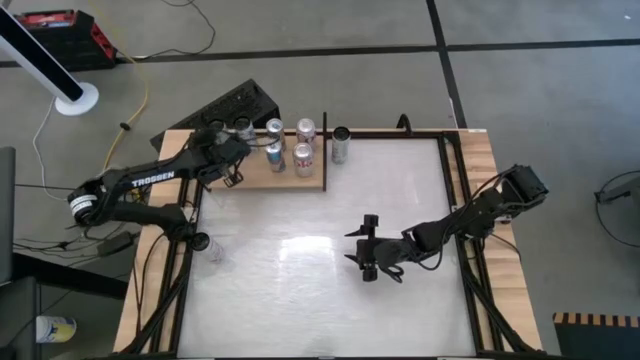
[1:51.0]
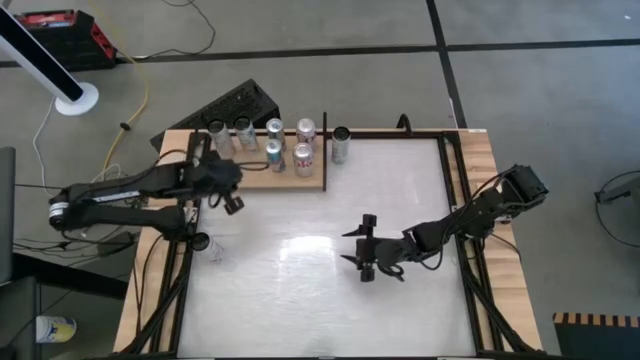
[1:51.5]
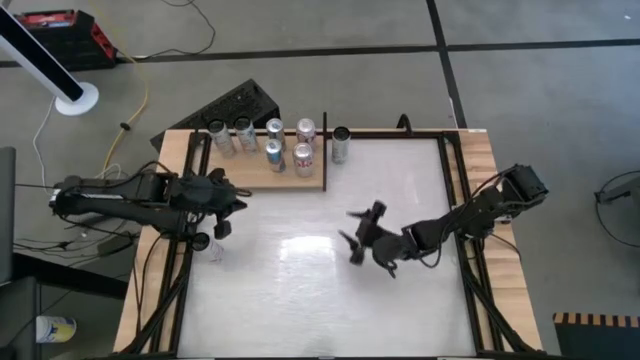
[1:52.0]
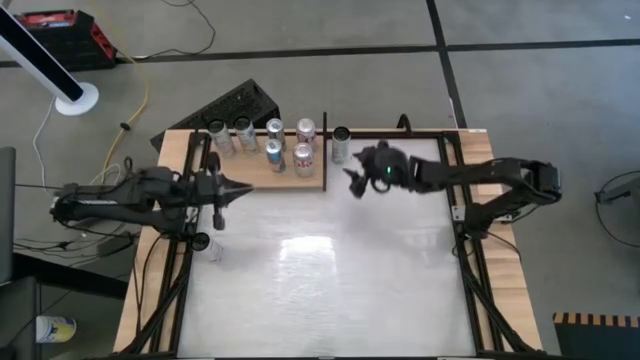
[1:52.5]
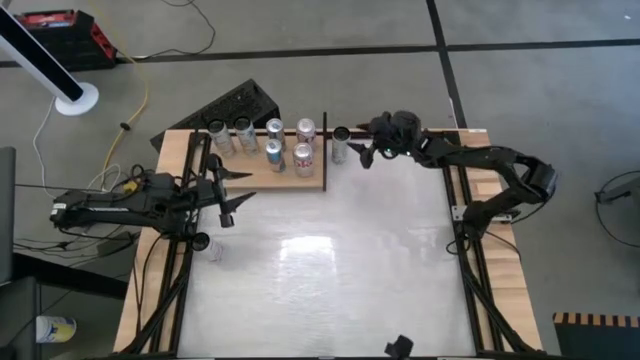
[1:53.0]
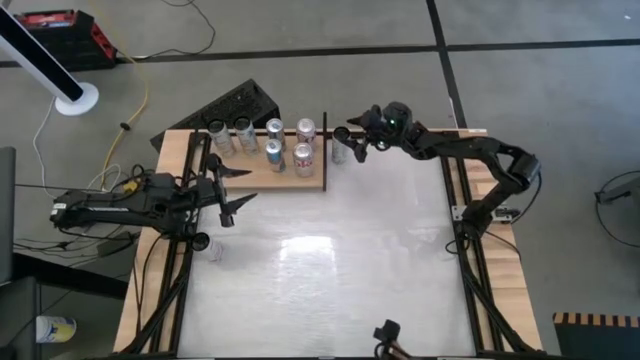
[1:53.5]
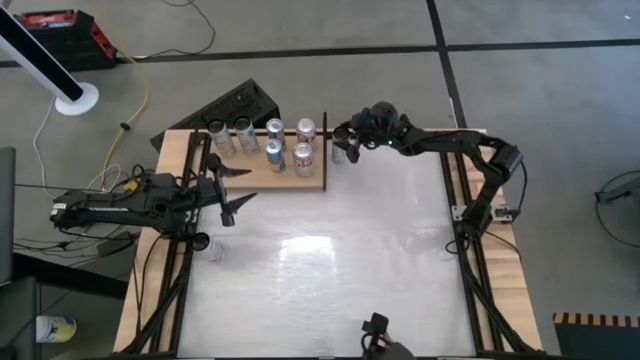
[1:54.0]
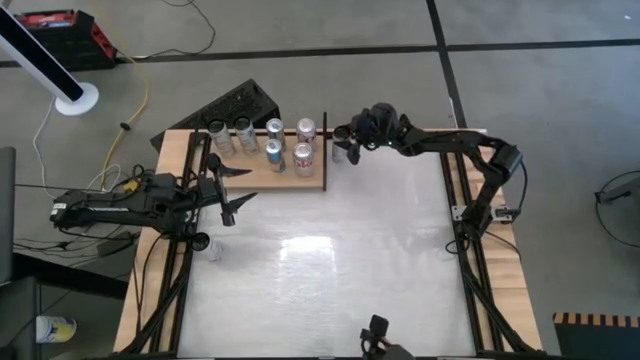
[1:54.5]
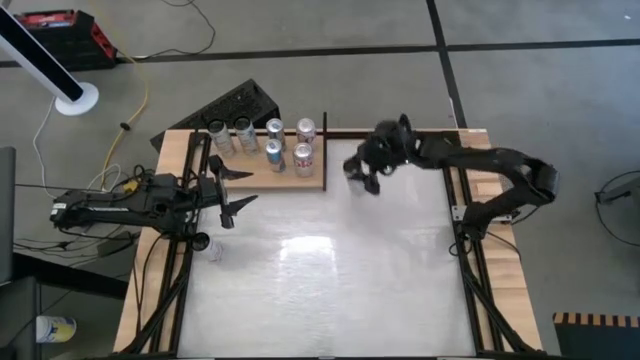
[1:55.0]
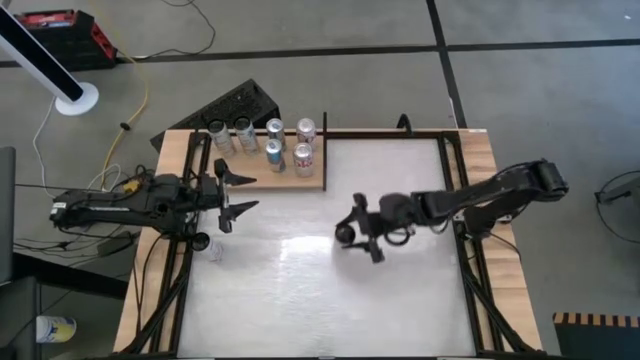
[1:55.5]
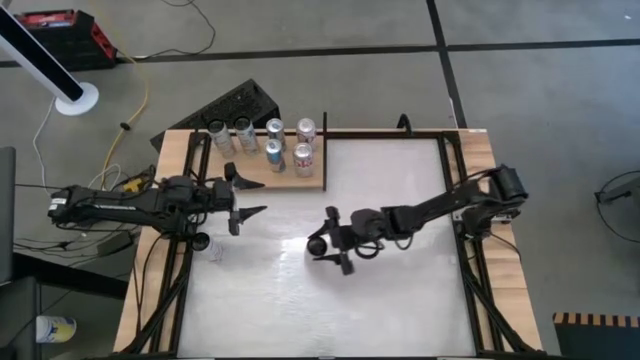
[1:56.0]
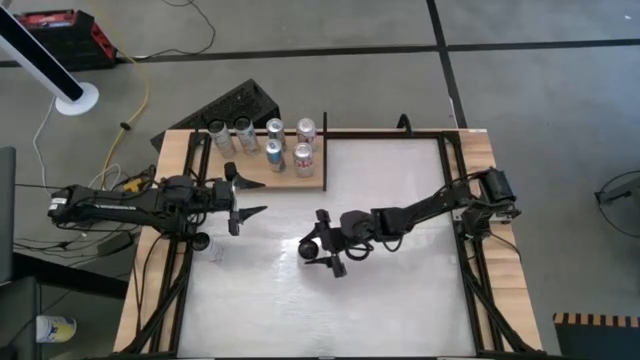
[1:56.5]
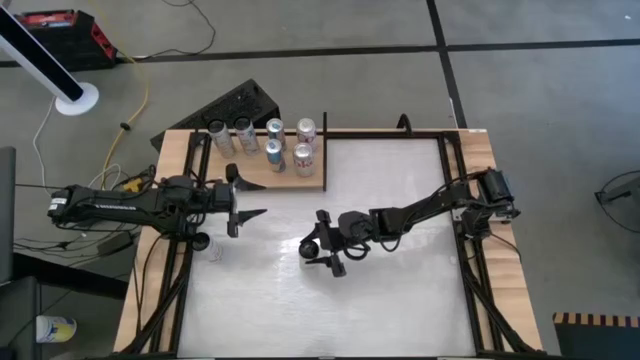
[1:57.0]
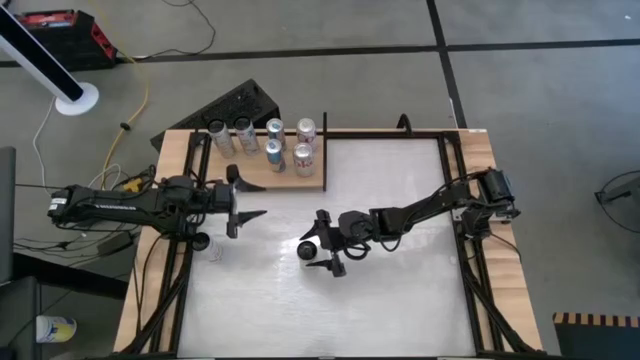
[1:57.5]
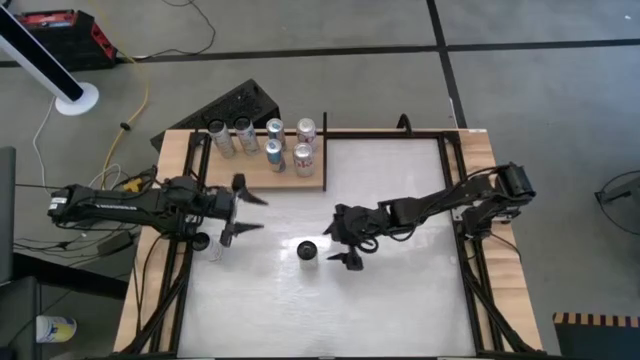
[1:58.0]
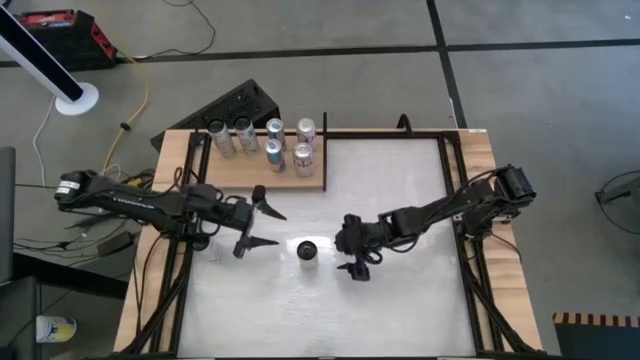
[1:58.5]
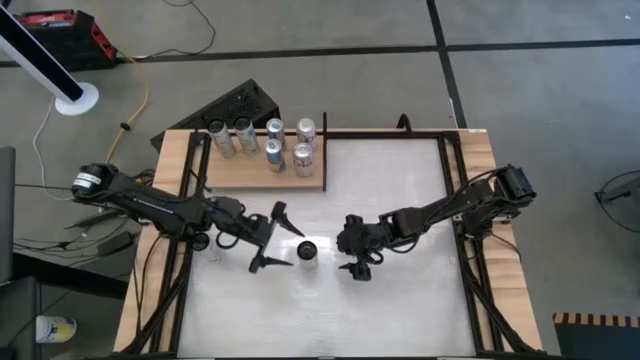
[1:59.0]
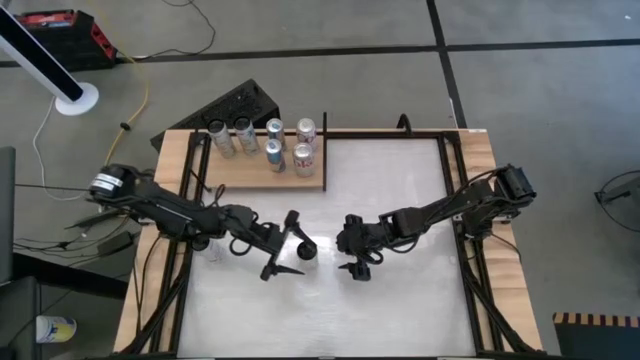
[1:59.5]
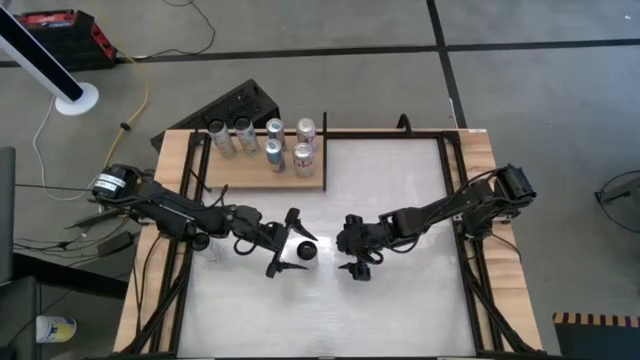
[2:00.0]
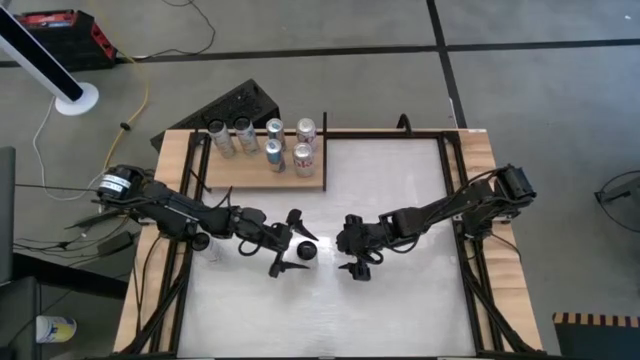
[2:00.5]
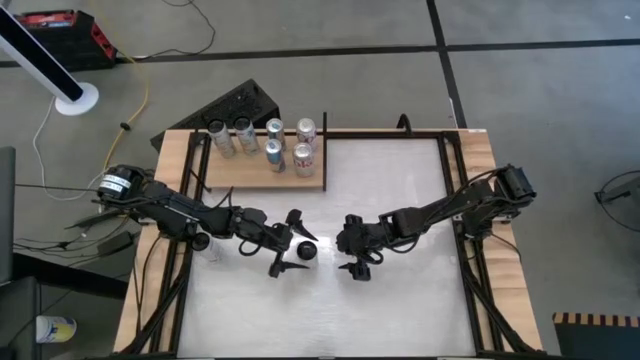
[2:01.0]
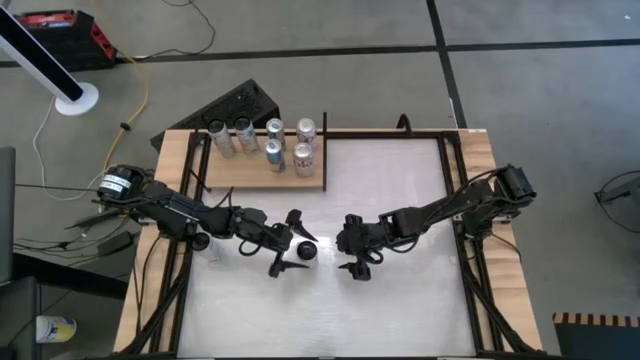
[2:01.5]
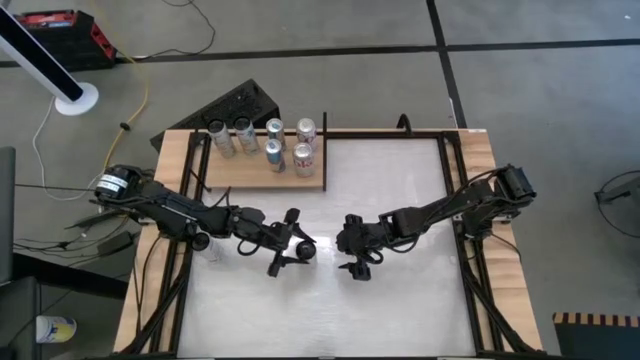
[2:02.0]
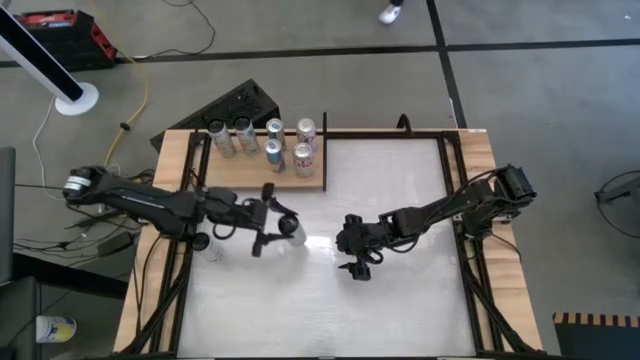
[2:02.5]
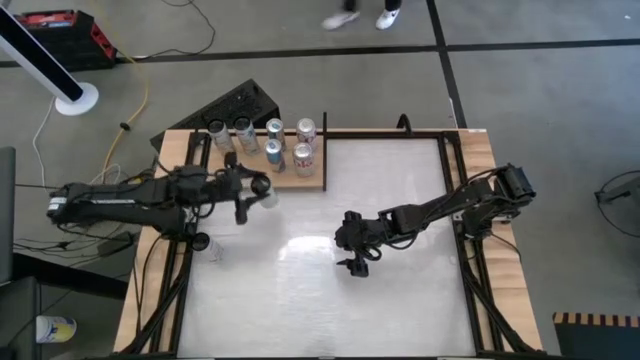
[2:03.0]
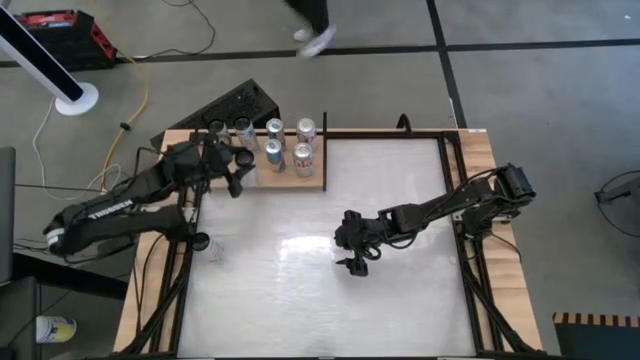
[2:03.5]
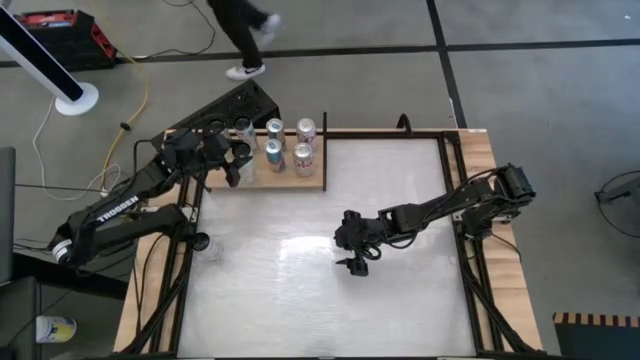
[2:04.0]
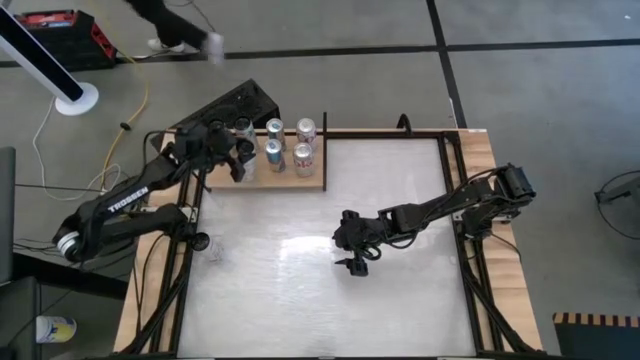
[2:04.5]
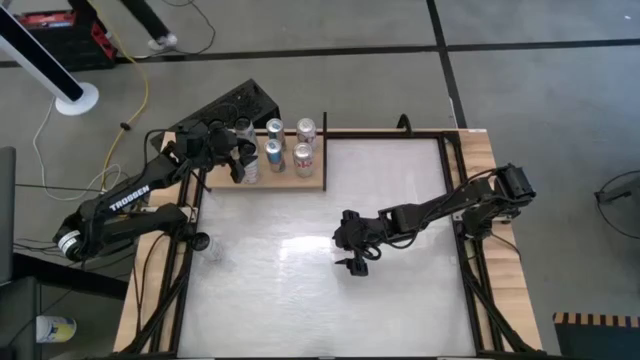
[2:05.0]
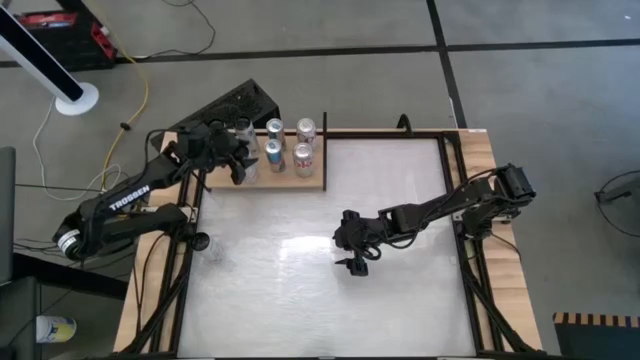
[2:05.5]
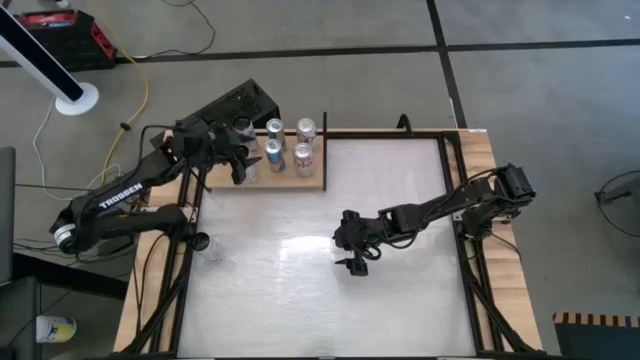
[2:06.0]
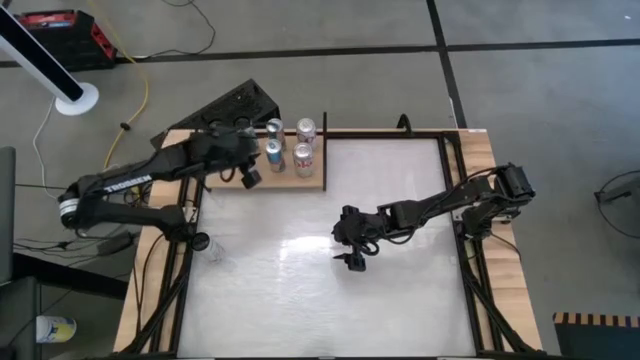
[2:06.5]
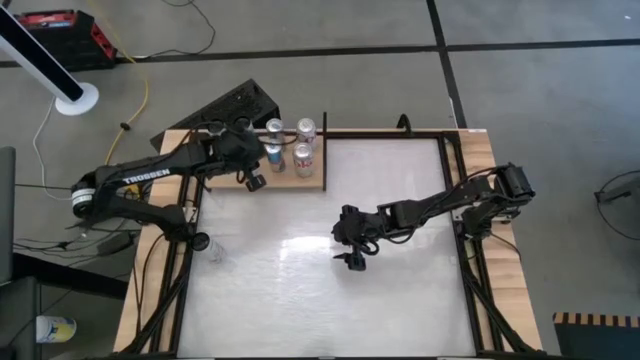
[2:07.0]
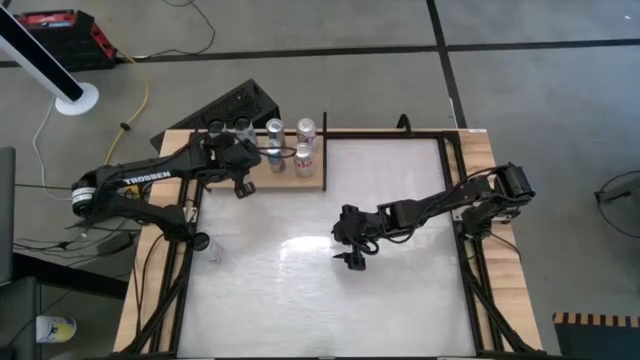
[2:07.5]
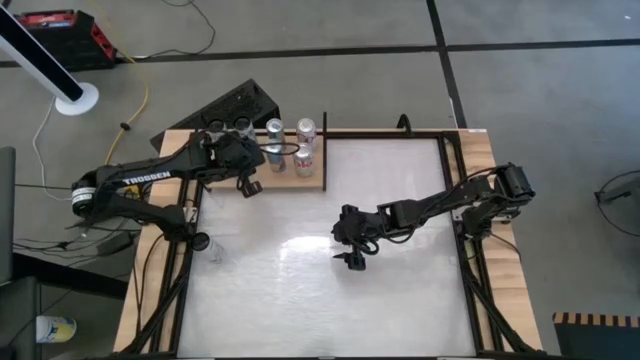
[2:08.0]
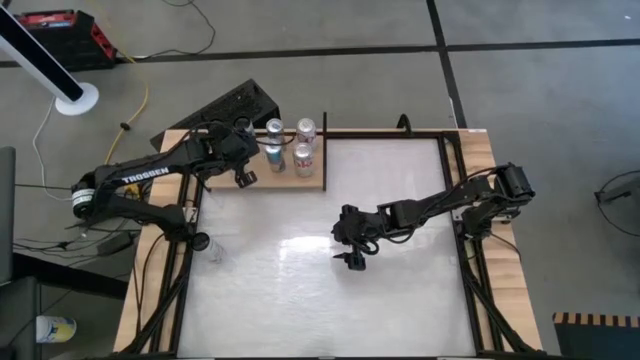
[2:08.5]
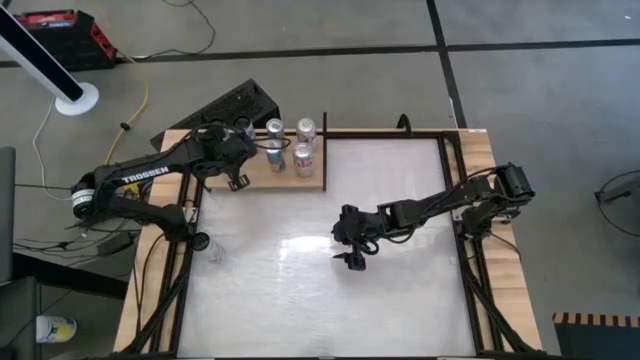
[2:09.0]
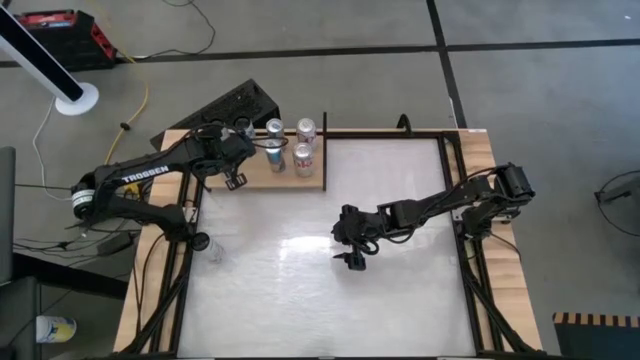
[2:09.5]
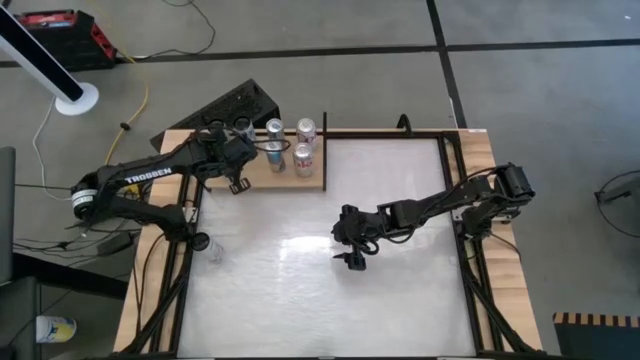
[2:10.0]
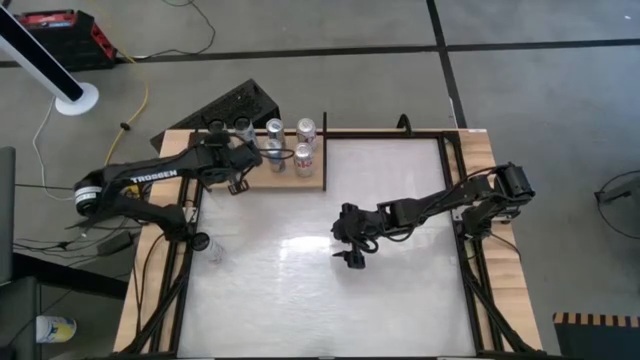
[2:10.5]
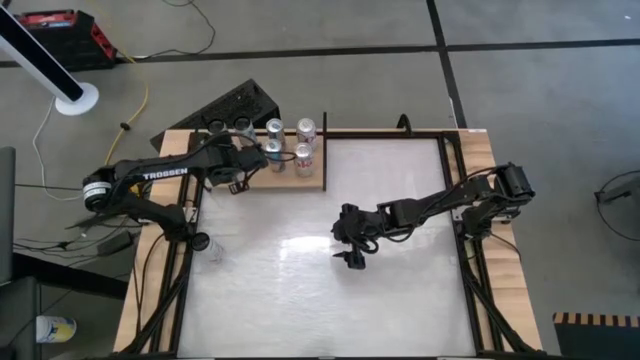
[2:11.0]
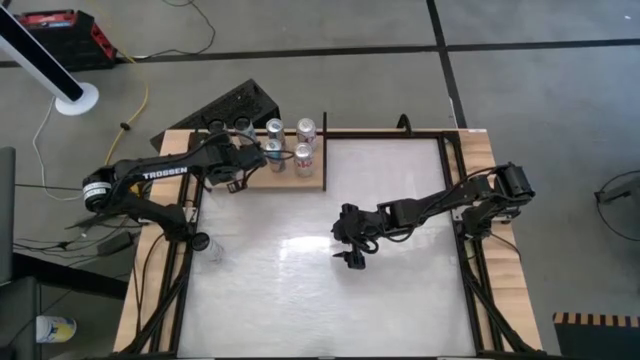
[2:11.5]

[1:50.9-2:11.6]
Task: Place canned beverage on shelf
Put the white-yellow soda can on the shelf aligned with the other white-yellow soda can
